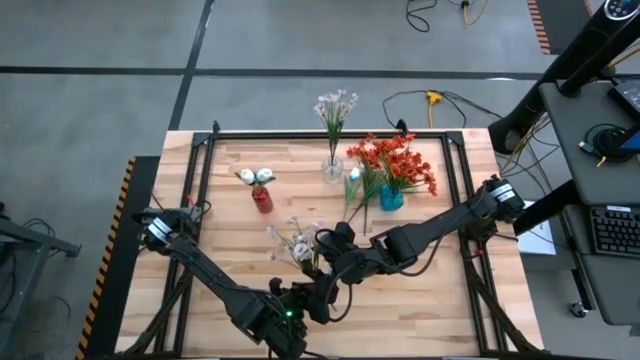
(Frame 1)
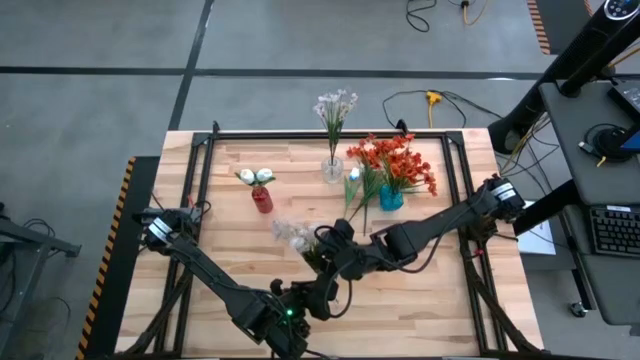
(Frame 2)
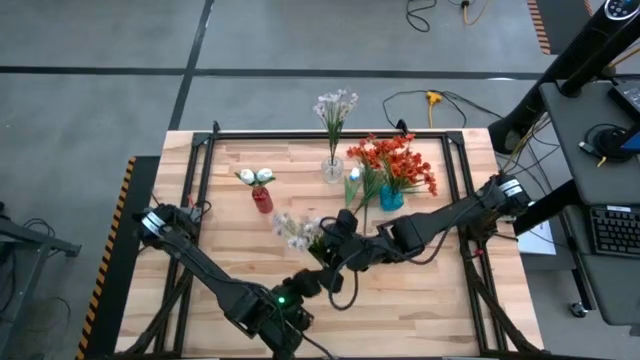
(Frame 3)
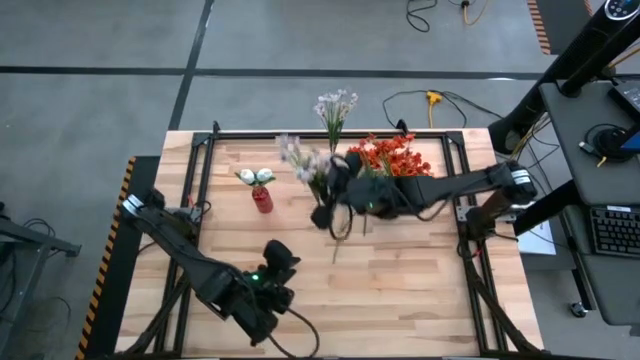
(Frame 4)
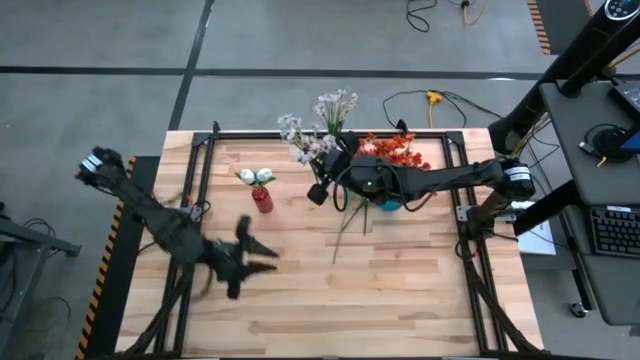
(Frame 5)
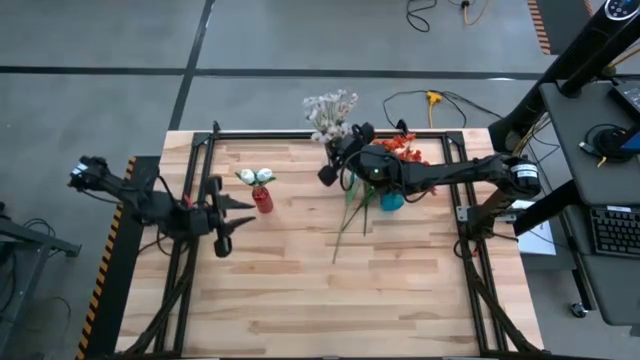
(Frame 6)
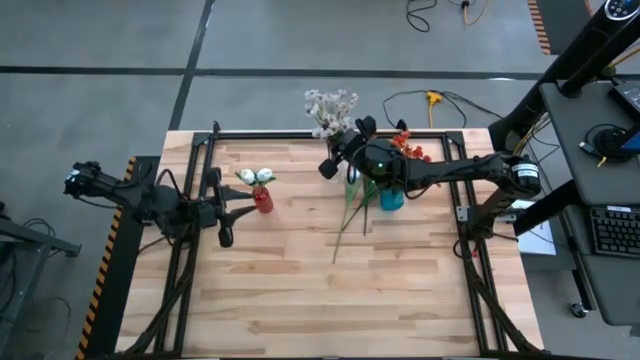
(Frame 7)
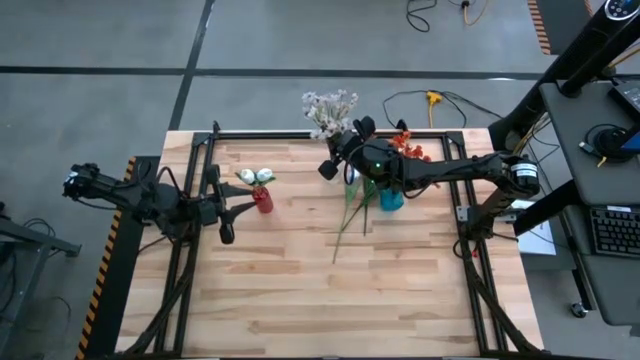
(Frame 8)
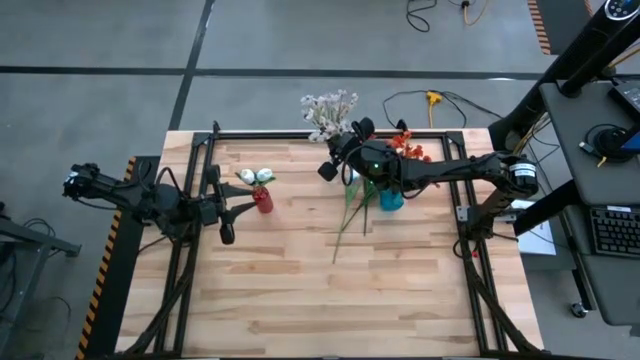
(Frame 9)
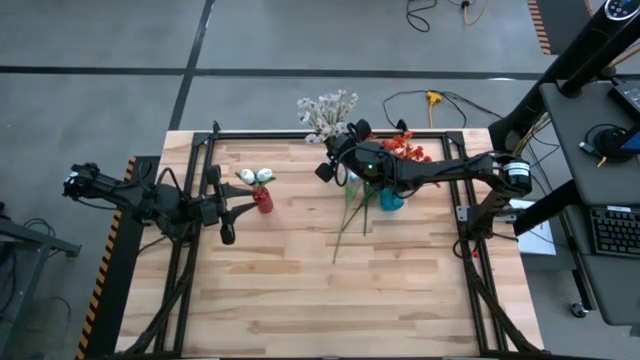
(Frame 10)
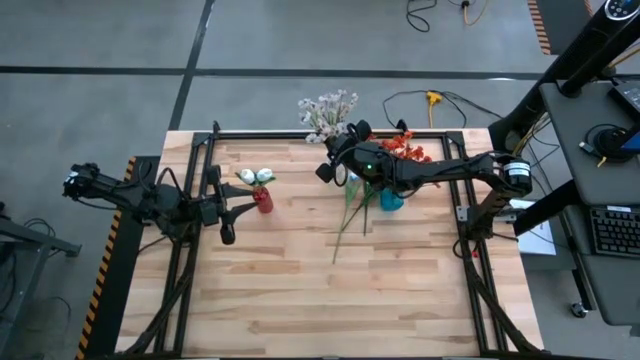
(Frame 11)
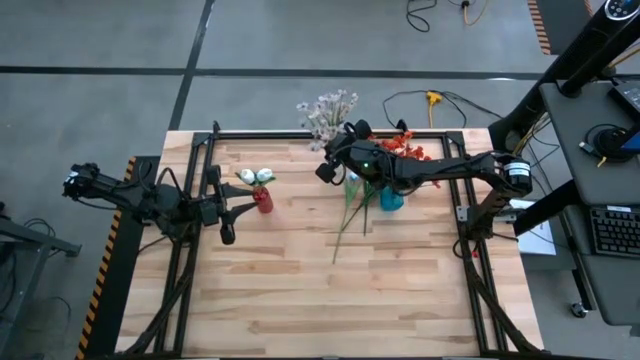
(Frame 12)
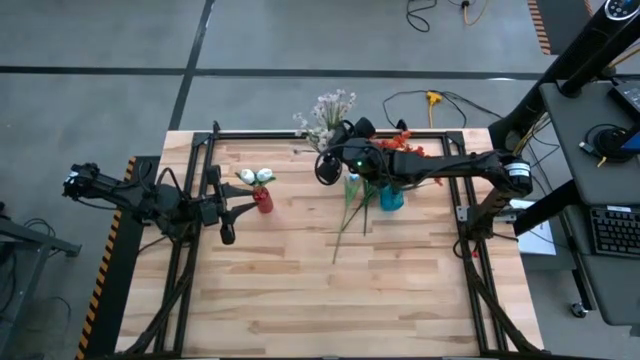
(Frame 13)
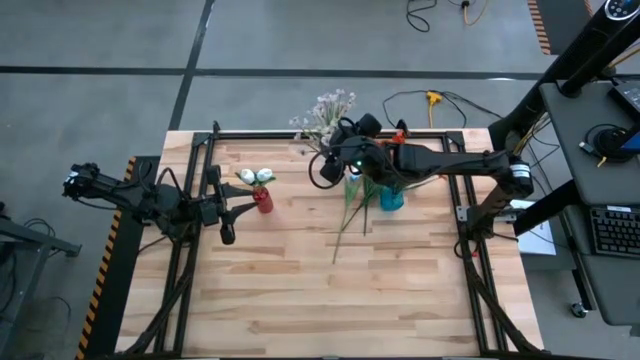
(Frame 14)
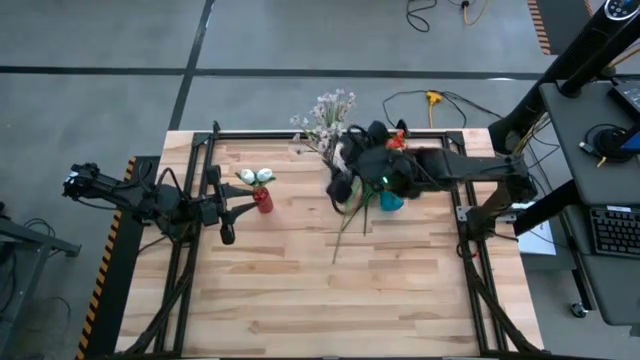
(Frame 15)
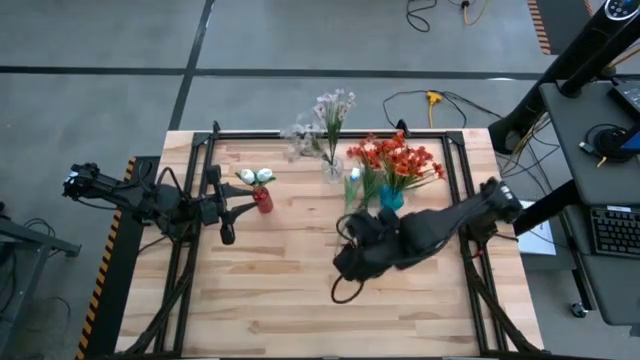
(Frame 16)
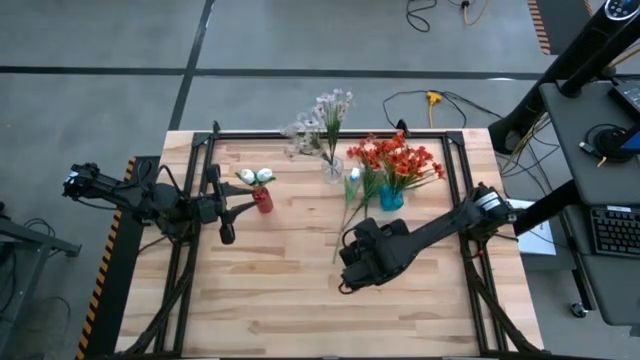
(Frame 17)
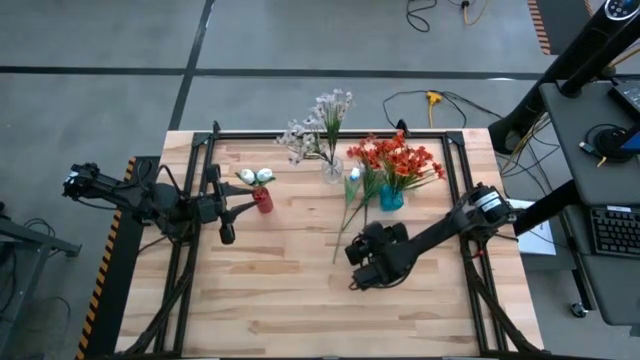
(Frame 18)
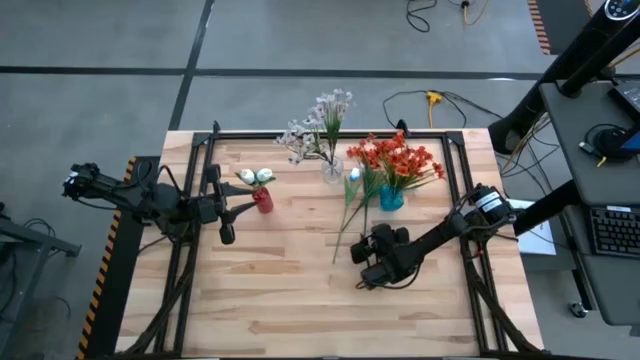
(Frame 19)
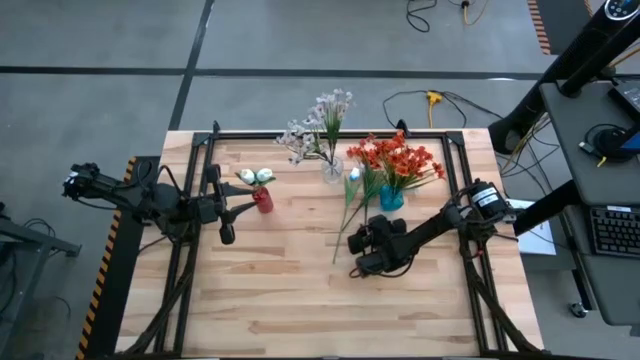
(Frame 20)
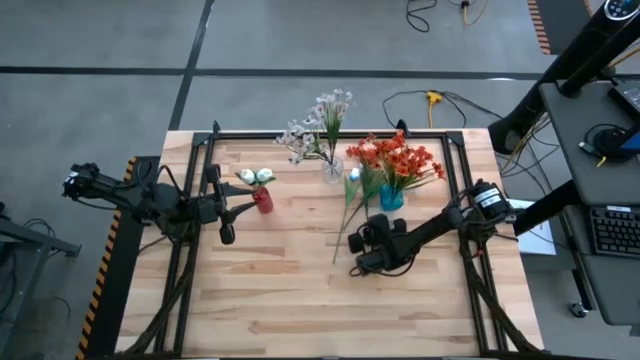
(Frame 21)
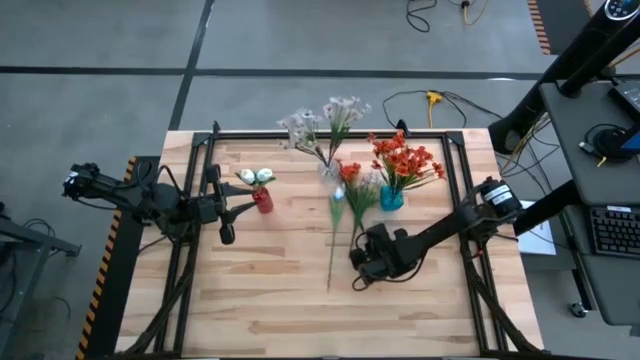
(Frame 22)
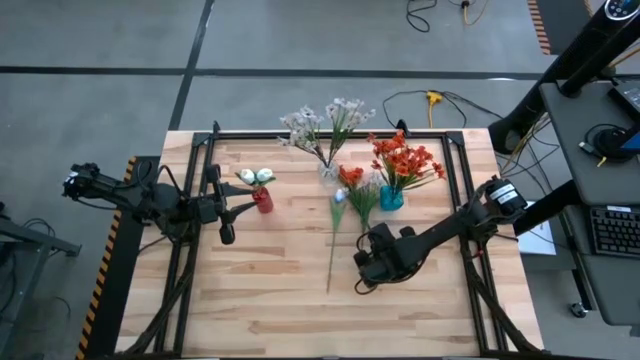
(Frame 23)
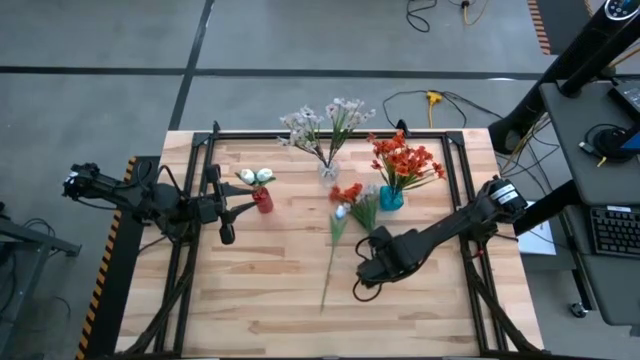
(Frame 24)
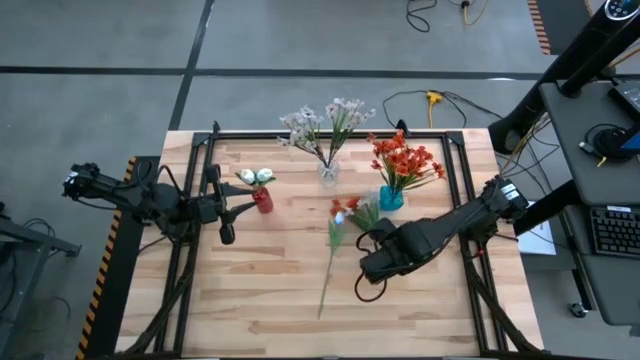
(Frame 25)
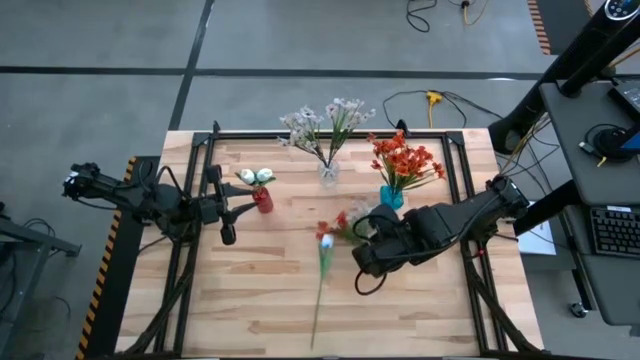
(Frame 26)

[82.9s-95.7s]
Task: Sort flowers into vase by color
Put the left white flowers into the transparent vase

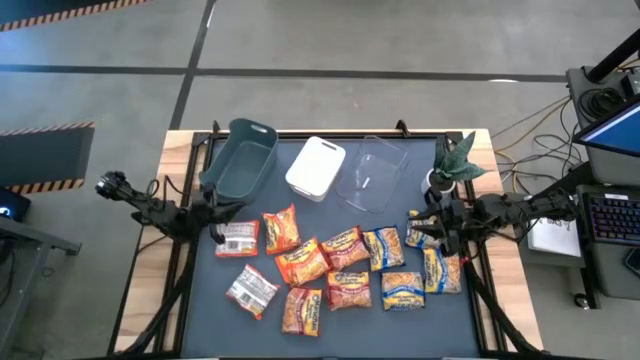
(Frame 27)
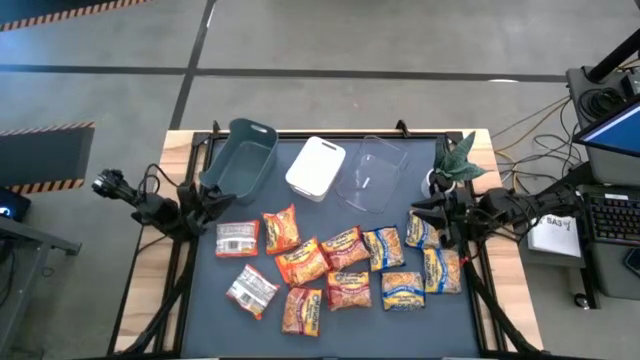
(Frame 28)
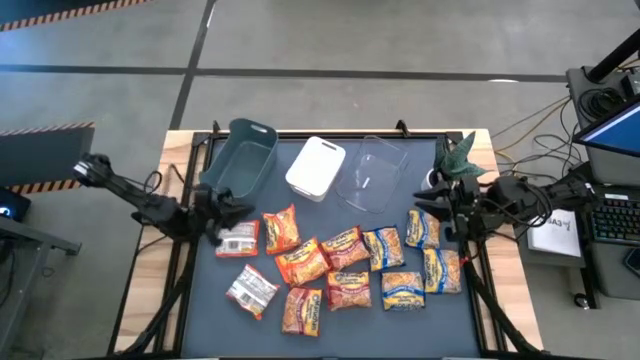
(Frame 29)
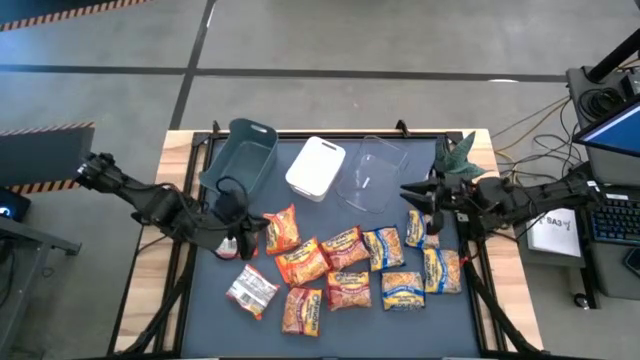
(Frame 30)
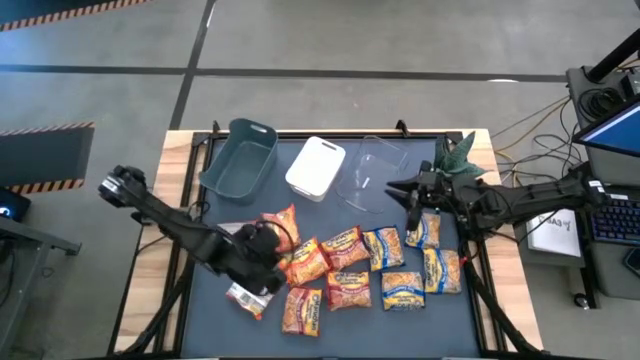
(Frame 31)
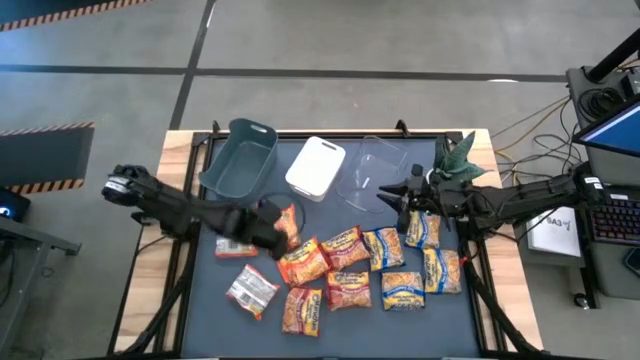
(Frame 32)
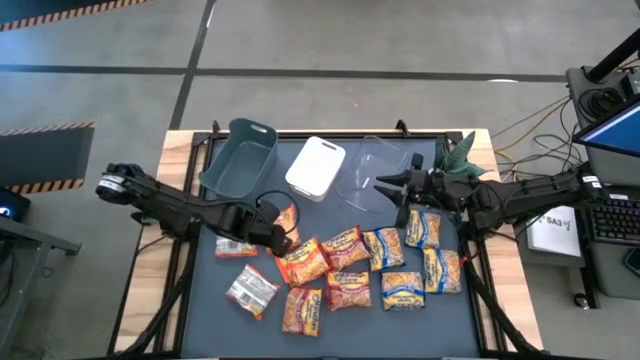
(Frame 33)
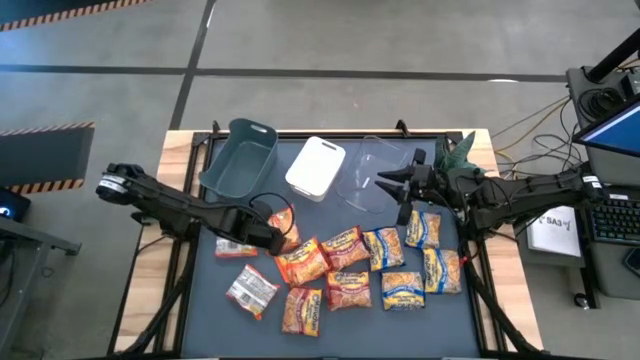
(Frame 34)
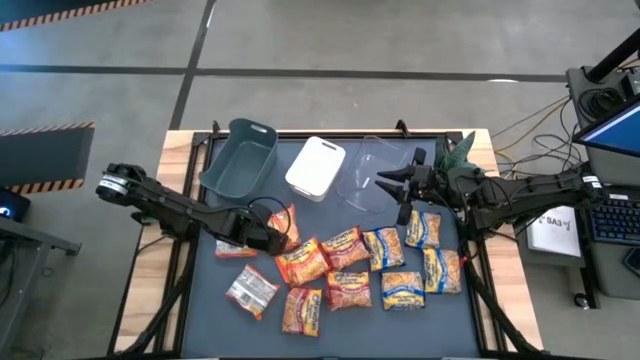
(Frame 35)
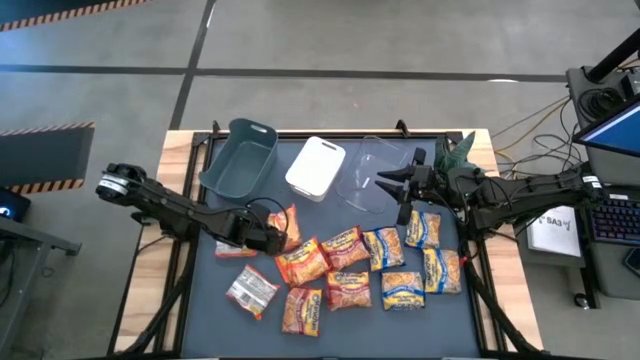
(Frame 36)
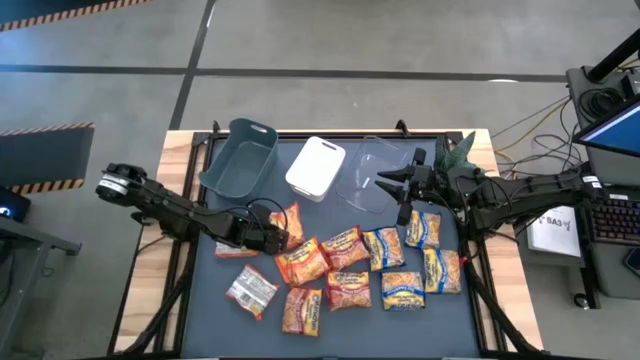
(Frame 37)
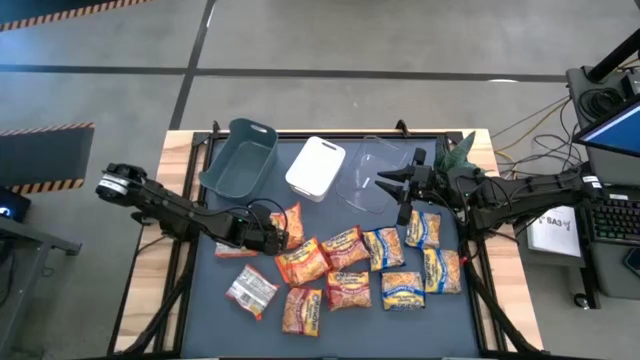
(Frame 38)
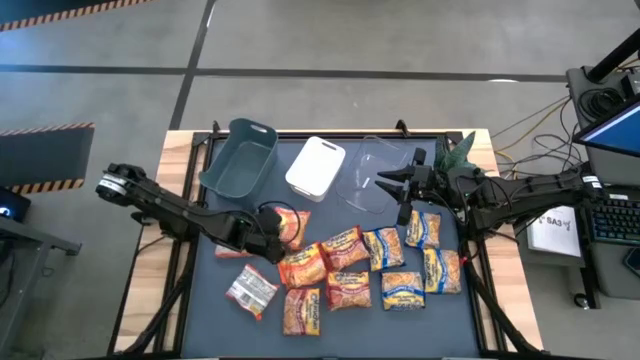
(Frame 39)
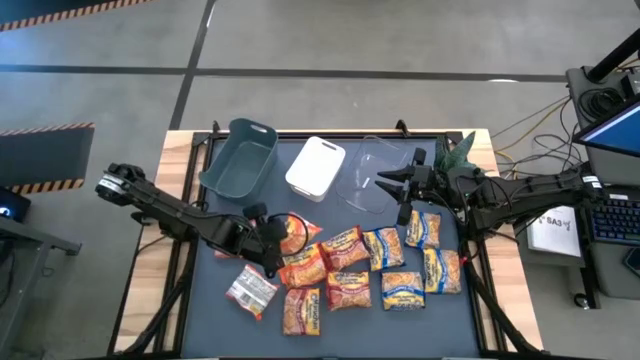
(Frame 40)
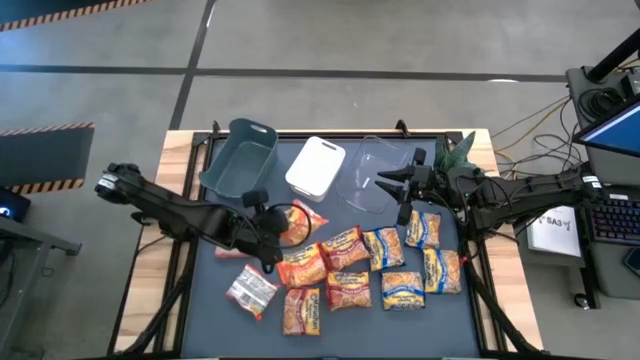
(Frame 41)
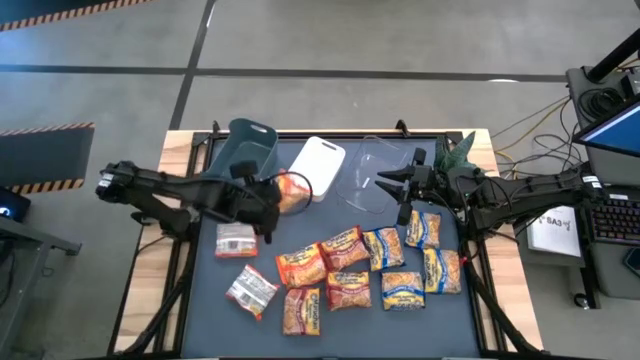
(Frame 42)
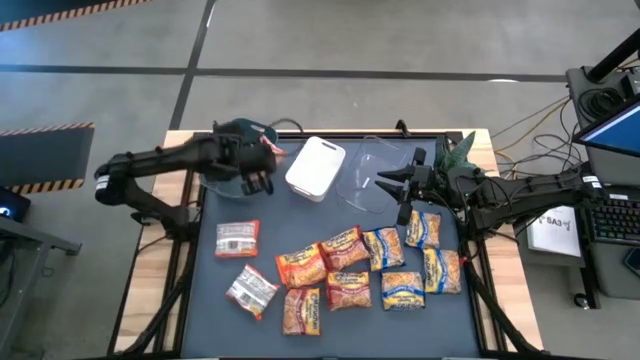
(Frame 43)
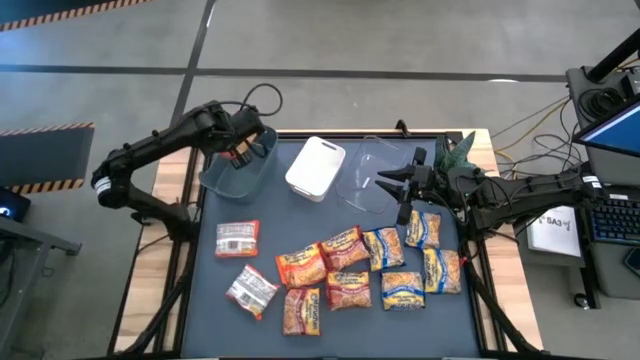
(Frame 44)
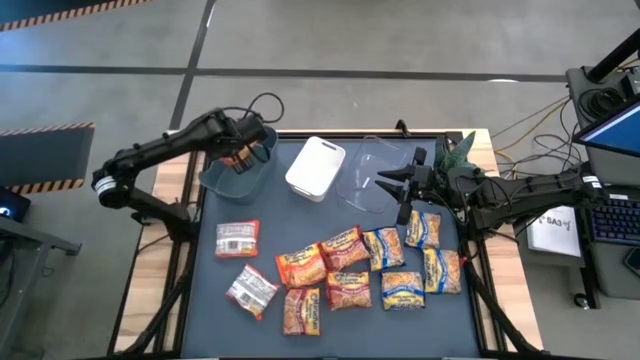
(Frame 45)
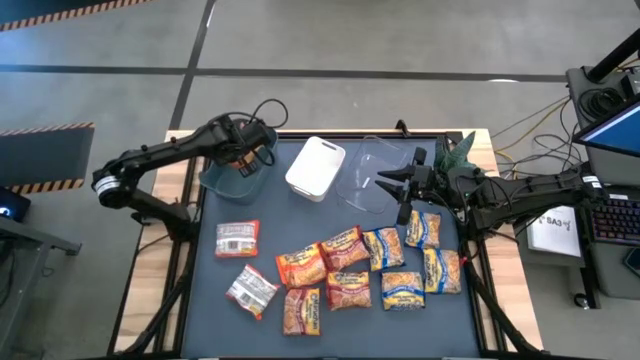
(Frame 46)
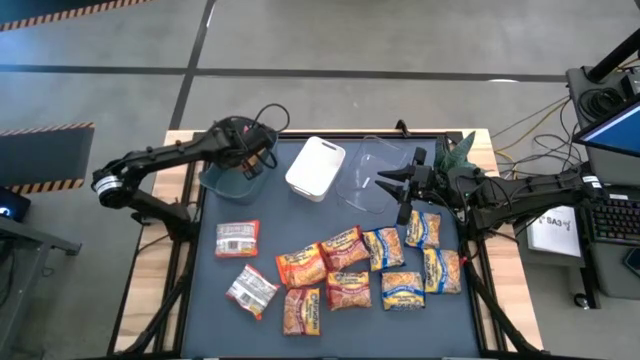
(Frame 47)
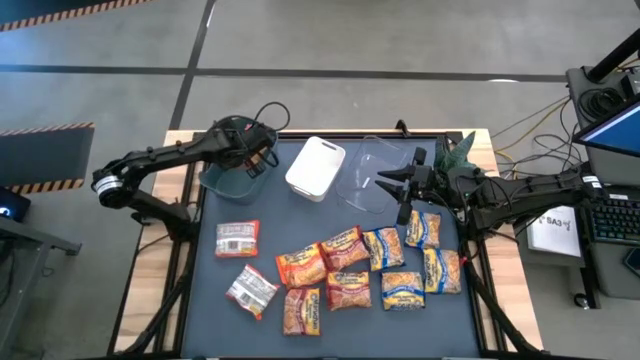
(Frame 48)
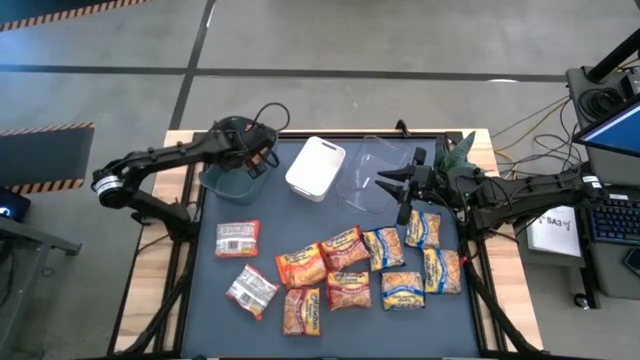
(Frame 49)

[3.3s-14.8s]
Task: Sort Maruchan noodles
Put the orange noodle pack into the blue bin
